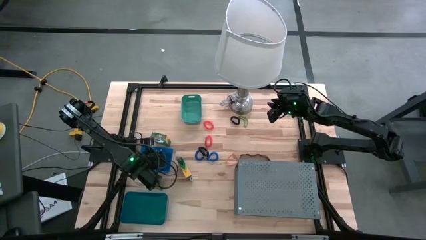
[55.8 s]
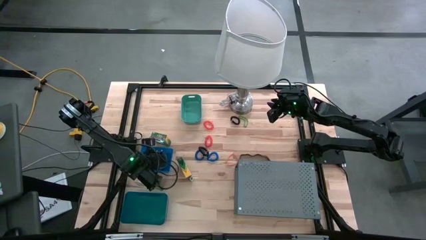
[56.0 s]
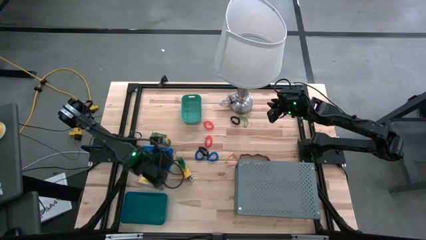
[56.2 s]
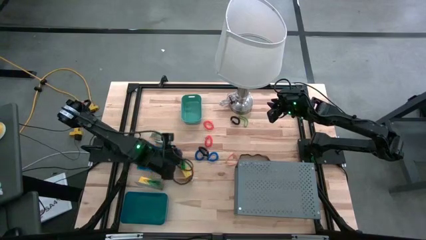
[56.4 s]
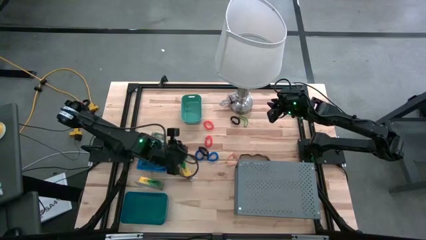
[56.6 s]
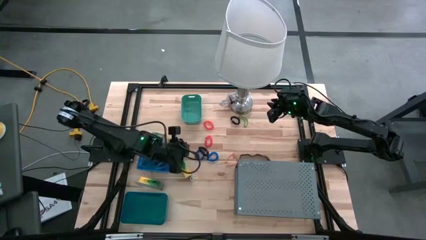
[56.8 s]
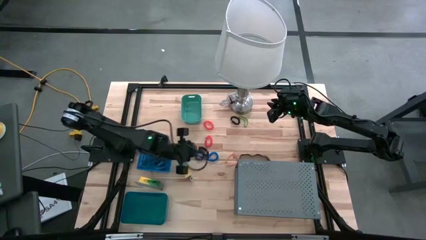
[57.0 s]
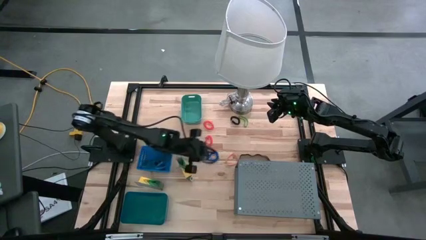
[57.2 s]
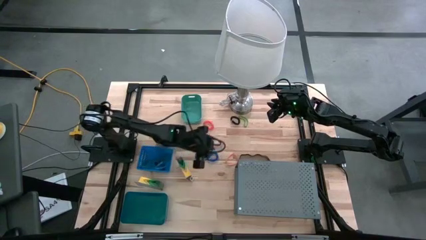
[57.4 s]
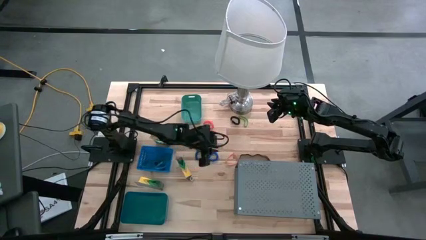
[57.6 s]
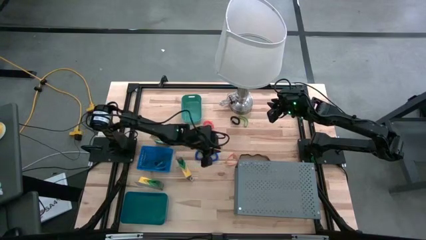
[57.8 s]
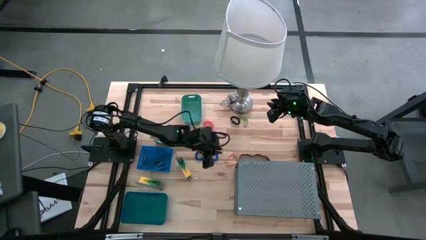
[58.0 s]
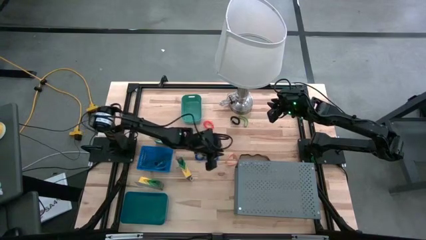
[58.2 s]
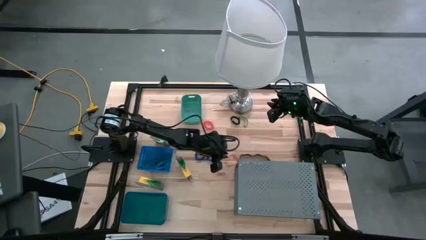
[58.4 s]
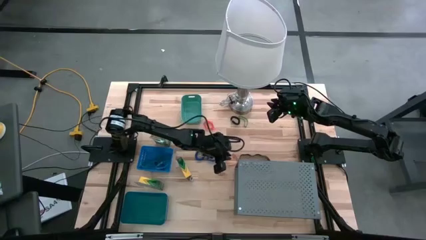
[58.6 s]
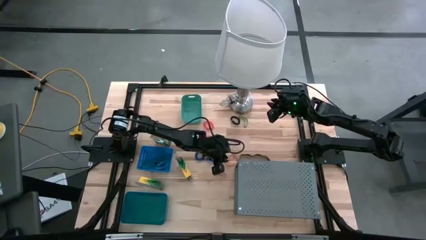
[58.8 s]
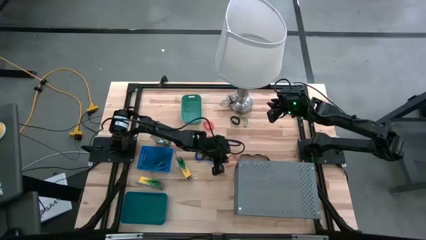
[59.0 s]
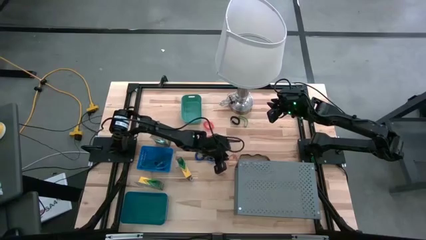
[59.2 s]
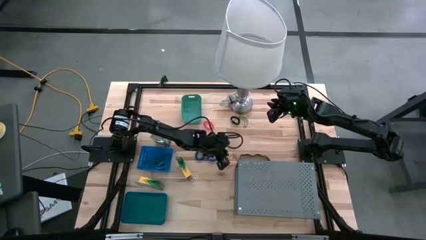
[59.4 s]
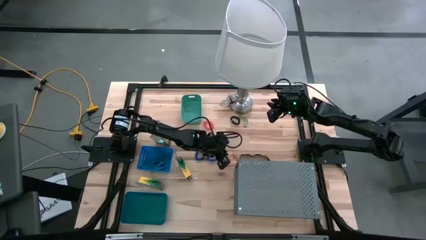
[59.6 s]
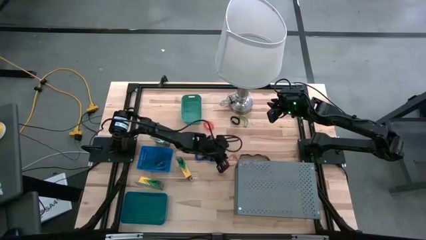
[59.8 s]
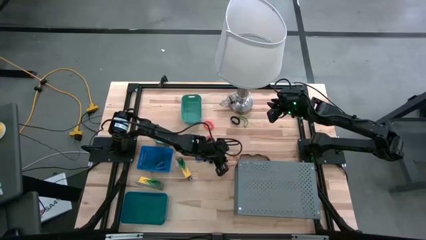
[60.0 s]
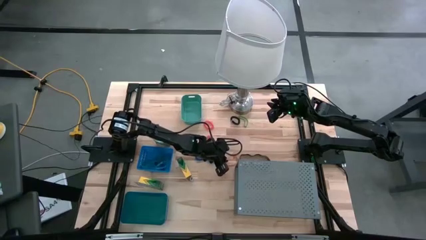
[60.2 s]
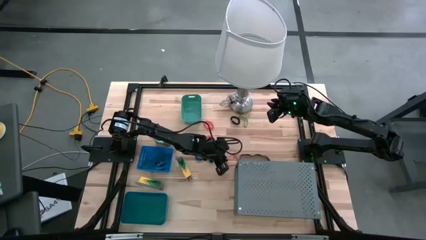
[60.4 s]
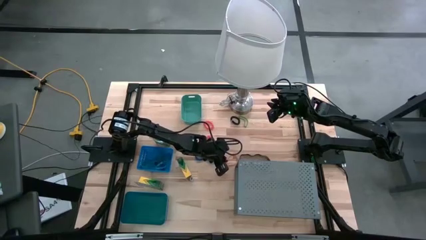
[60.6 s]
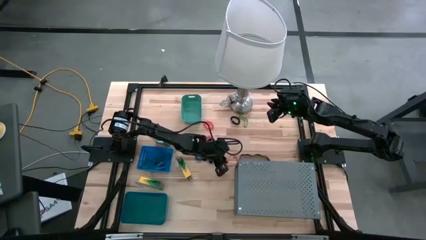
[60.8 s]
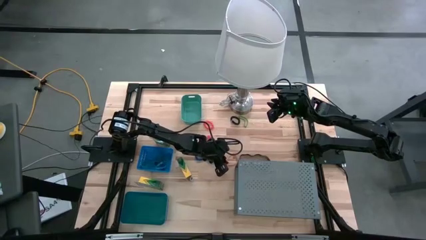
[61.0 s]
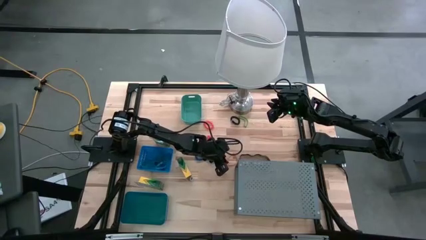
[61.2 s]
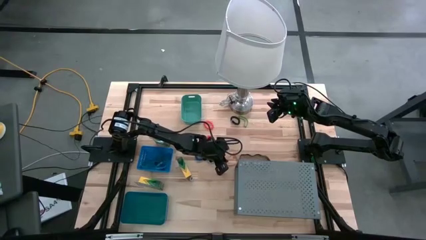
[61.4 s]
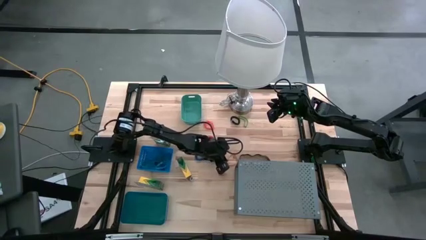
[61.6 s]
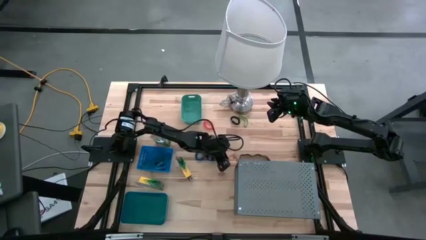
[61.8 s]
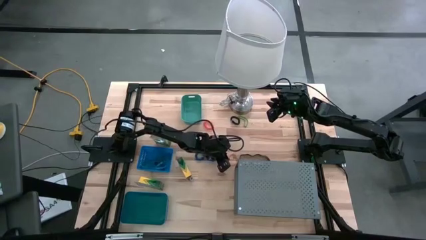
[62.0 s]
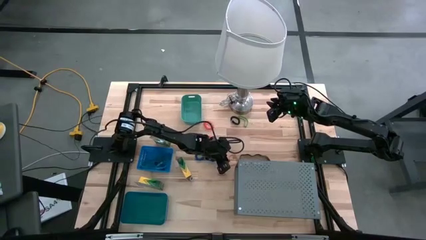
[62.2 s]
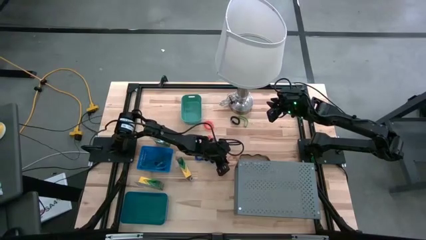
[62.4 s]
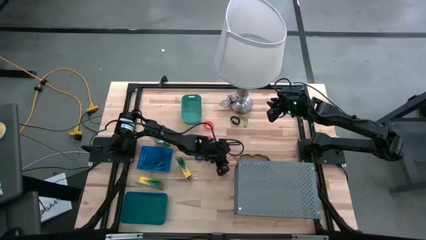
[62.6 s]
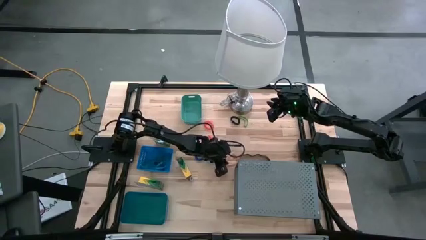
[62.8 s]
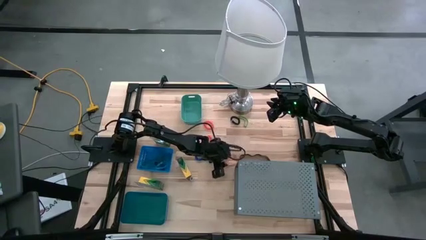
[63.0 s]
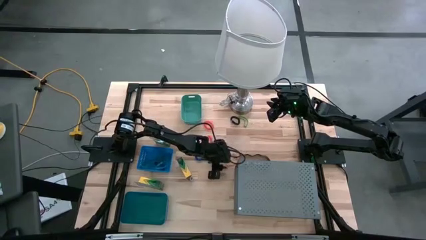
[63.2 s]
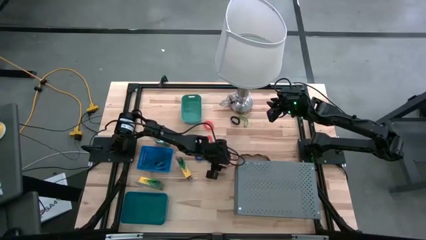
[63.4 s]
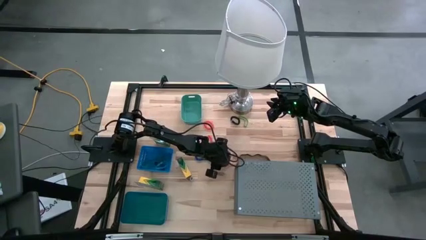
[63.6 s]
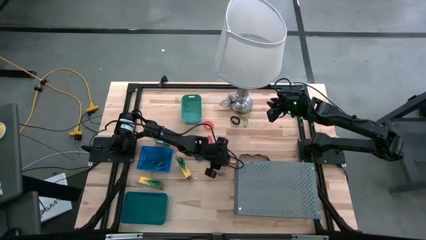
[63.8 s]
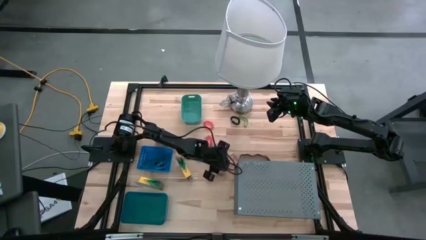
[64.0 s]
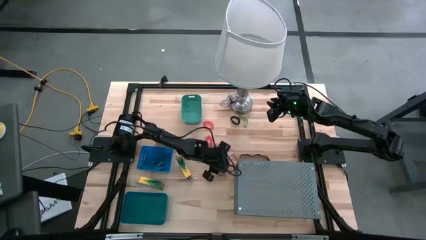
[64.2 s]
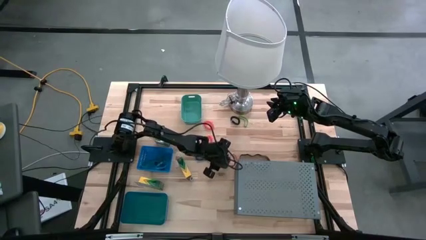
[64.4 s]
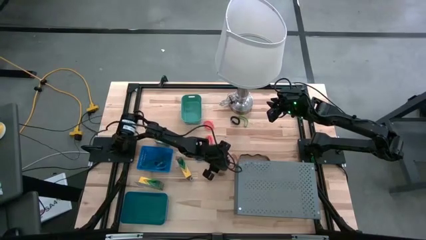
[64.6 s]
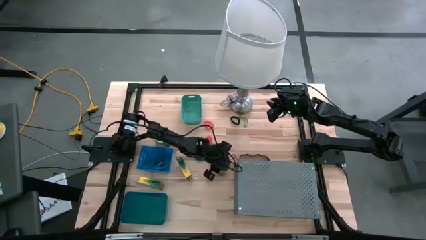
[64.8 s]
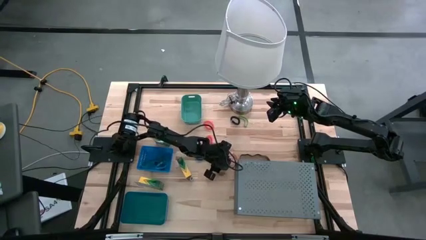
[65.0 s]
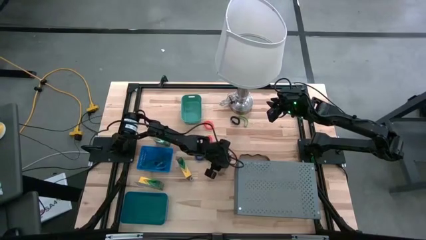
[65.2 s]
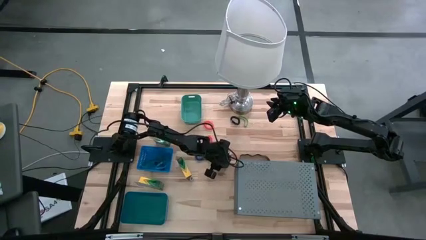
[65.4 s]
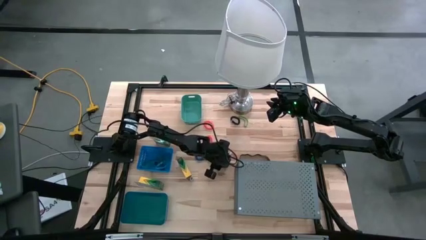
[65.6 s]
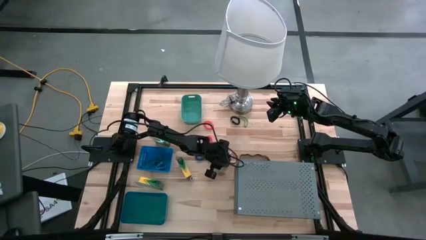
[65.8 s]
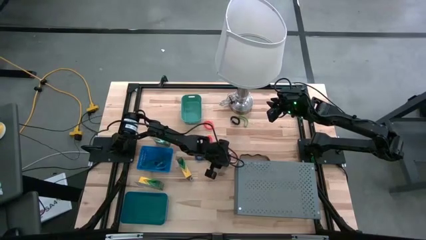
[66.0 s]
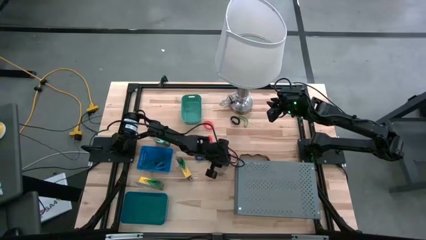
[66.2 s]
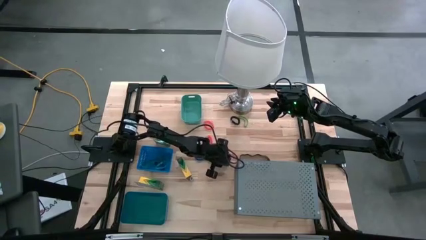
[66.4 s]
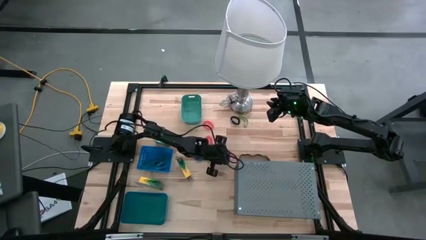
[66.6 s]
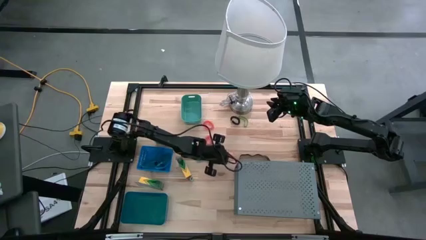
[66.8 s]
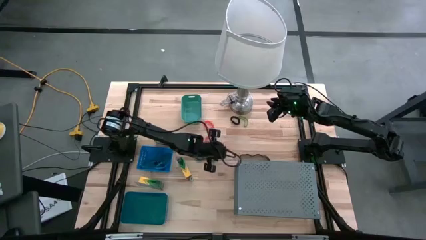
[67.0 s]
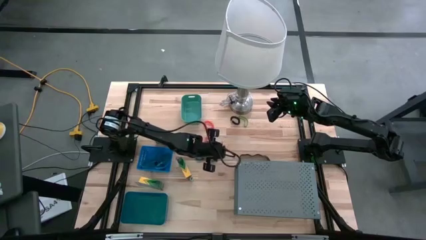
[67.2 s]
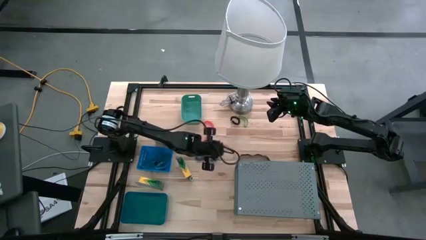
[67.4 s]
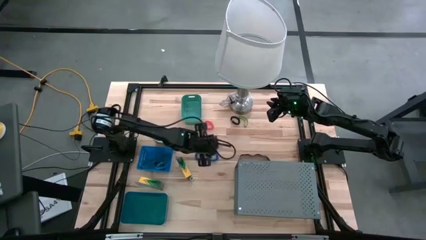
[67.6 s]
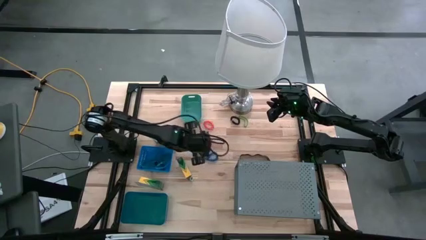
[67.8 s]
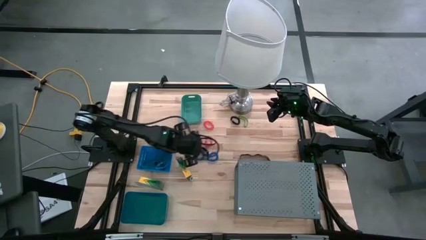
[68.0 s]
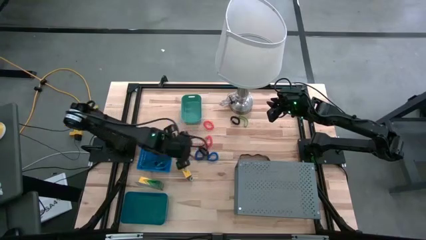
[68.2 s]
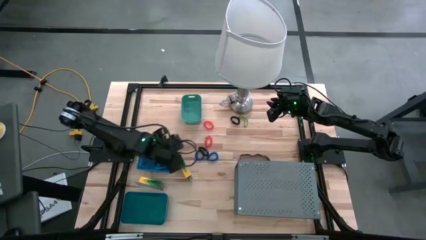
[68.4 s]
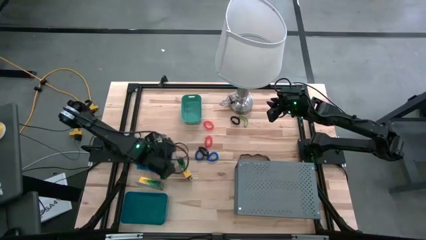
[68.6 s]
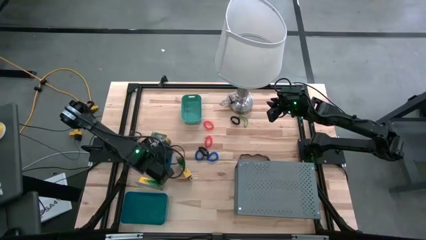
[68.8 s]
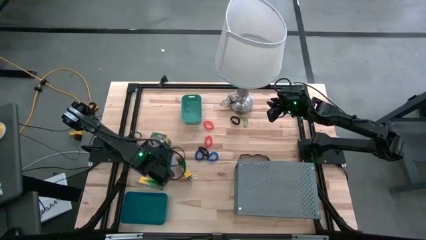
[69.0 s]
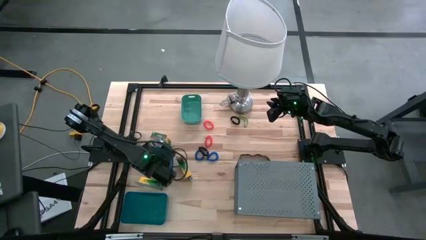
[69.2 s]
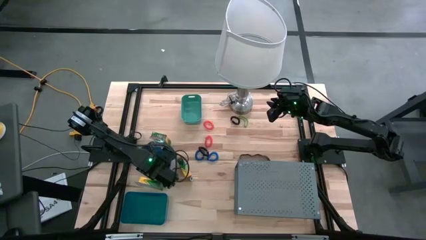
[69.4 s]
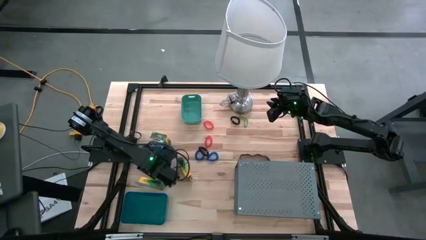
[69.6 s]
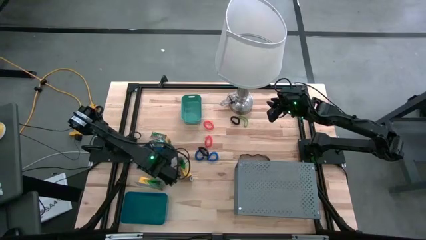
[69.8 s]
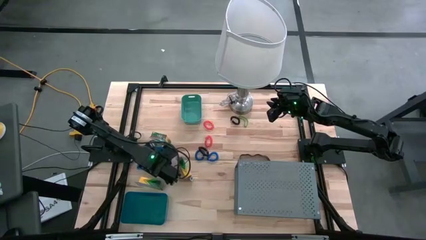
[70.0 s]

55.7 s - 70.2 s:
Task: Pick & Place Office Desk Supplies
Put the orange rubber bands into the top blue bin

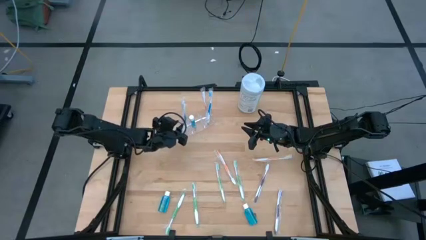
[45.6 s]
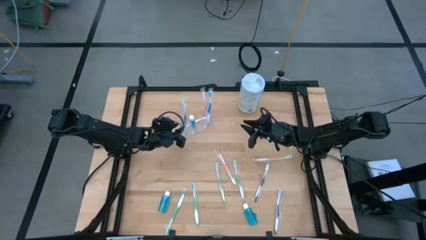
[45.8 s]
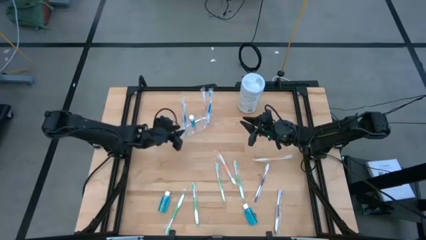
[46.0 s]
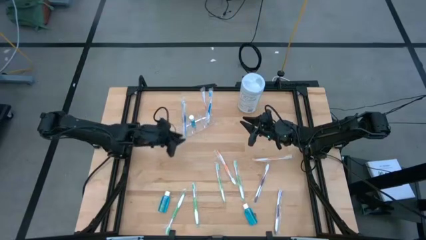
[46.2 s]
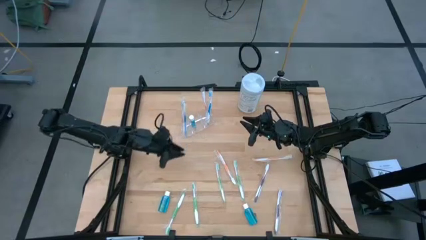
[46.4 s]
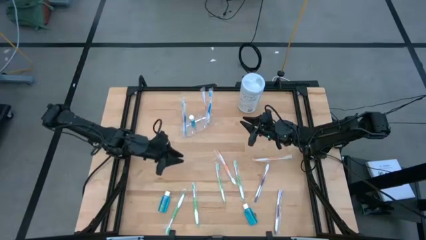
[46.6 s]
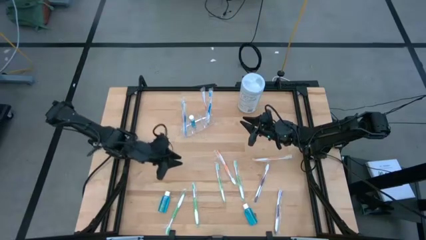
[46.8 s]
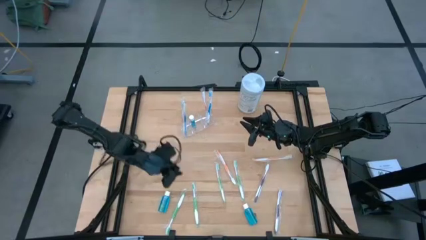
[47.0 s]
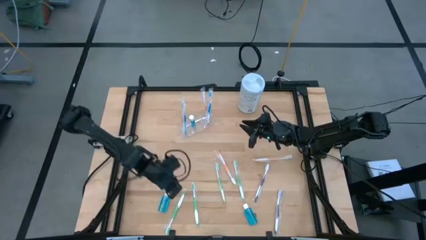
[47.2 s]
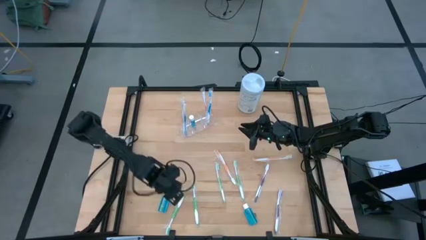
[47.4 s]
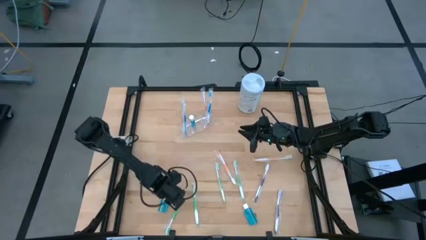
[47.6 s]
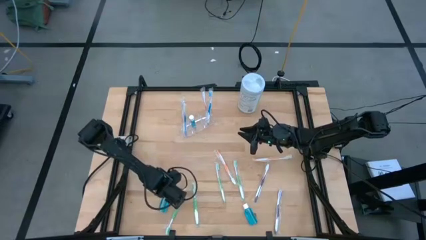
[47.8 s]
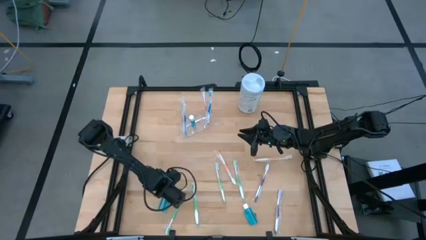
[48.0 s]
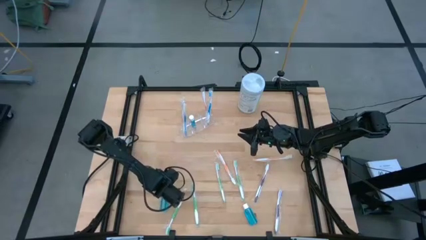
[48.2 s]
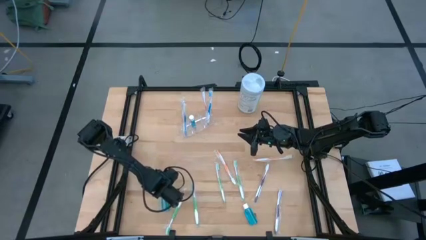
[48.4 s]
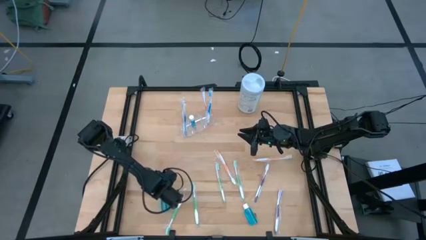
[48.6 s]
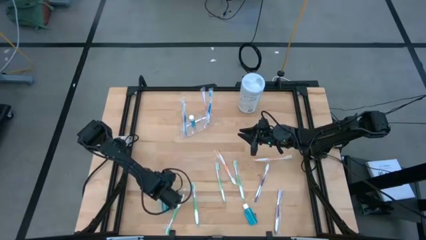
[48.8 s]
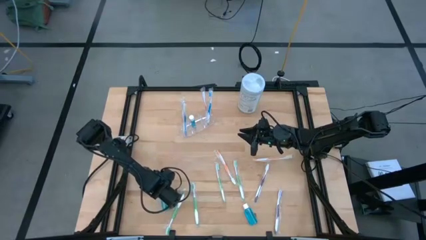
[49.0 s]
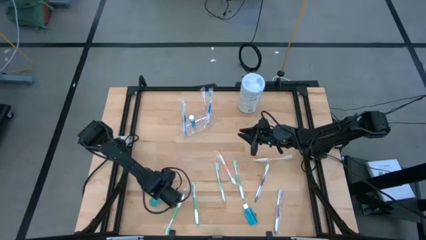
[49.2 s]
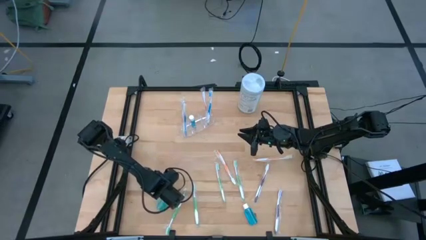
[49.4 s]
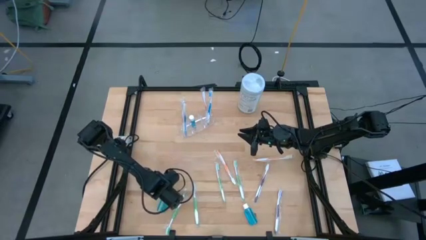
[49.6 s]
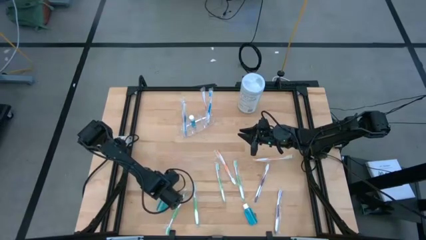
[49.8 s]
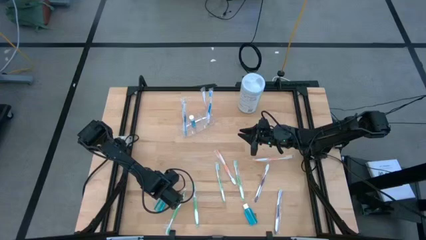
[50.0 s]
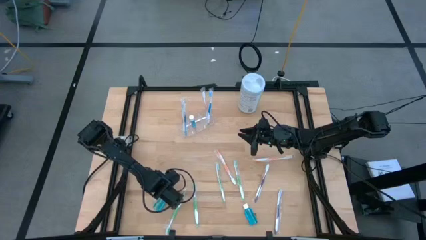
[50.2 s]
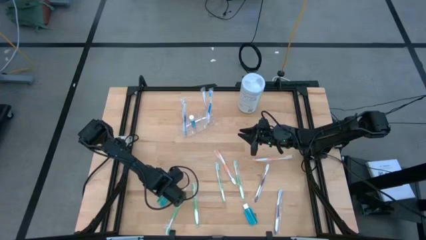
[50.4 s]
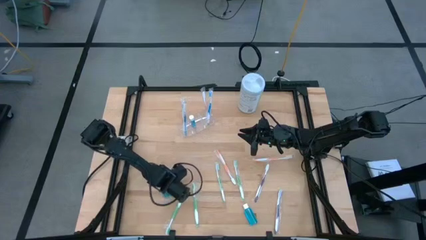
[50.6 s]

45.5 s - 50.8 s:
Task: Pick & Place toothbrushing station
Put the blue mouthwash into the transparent organizer
